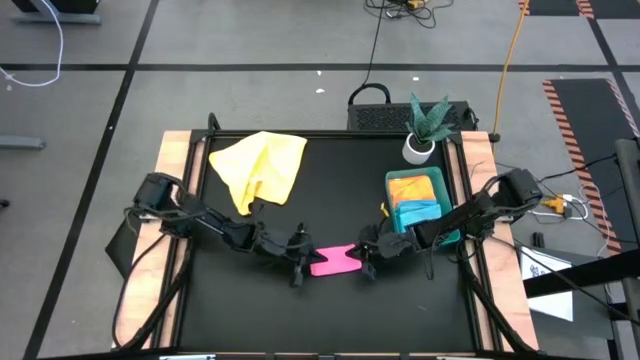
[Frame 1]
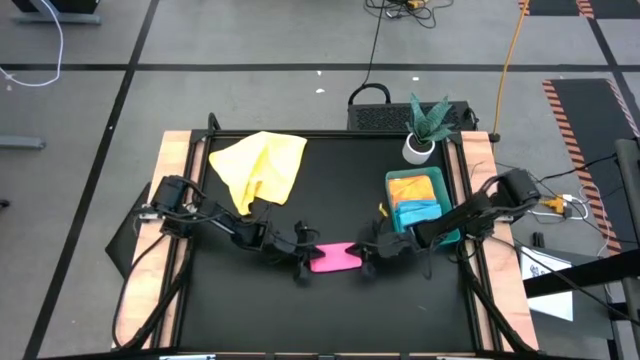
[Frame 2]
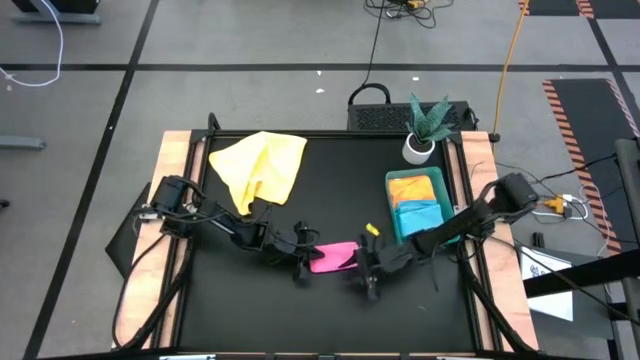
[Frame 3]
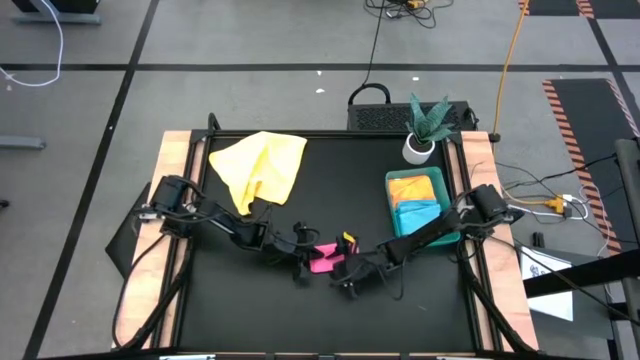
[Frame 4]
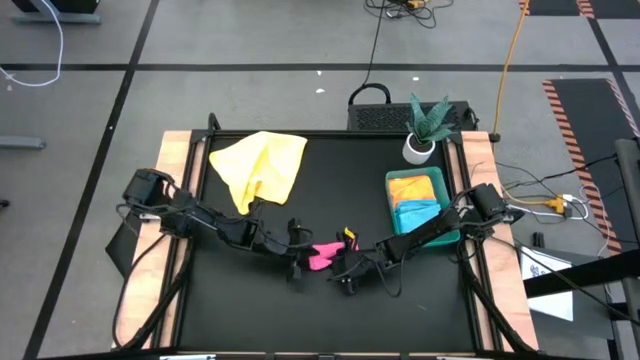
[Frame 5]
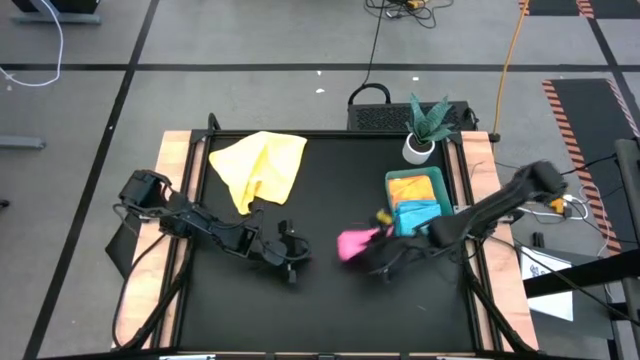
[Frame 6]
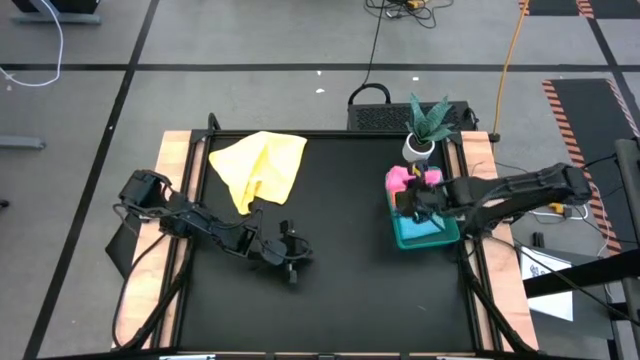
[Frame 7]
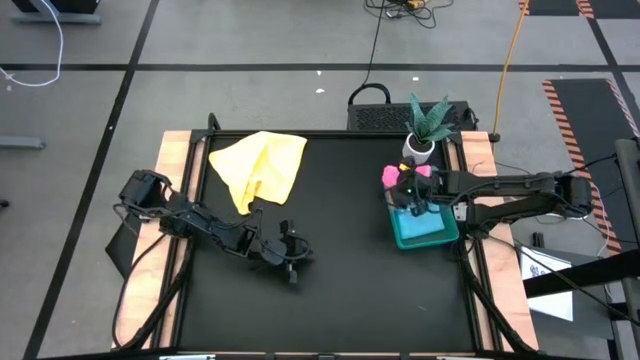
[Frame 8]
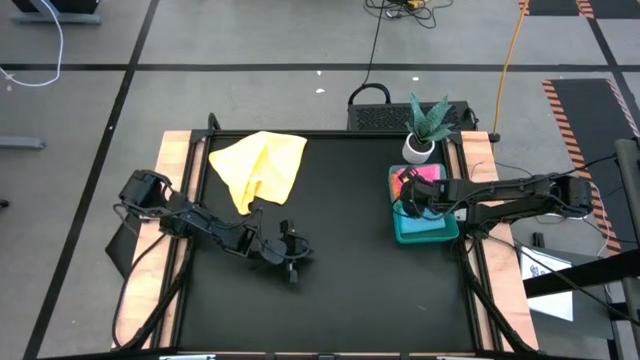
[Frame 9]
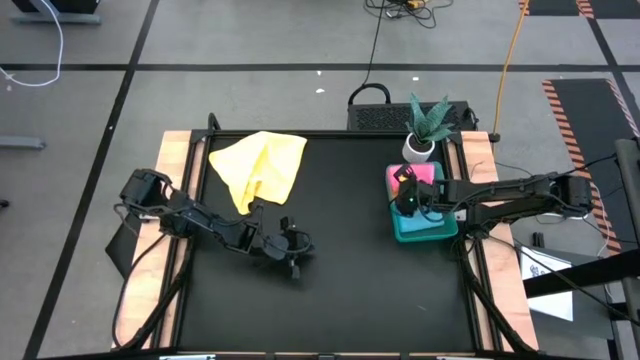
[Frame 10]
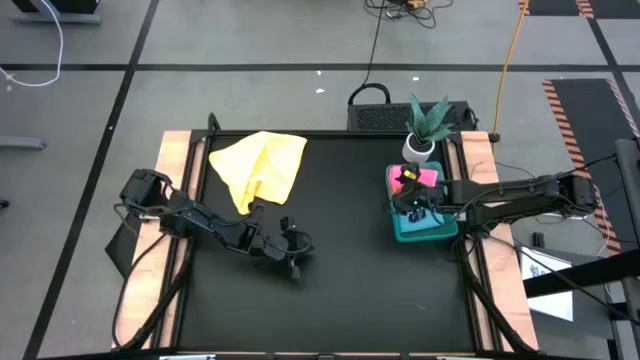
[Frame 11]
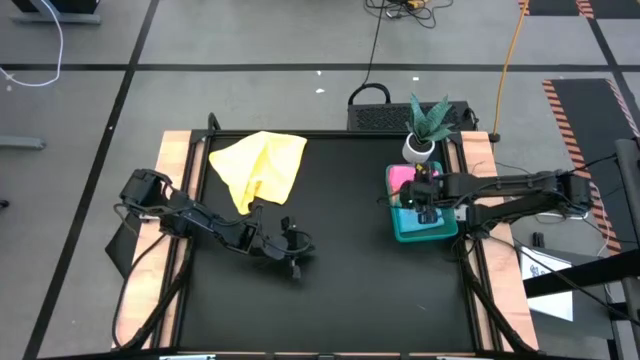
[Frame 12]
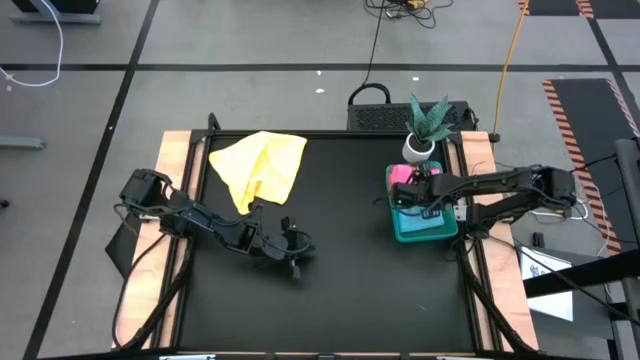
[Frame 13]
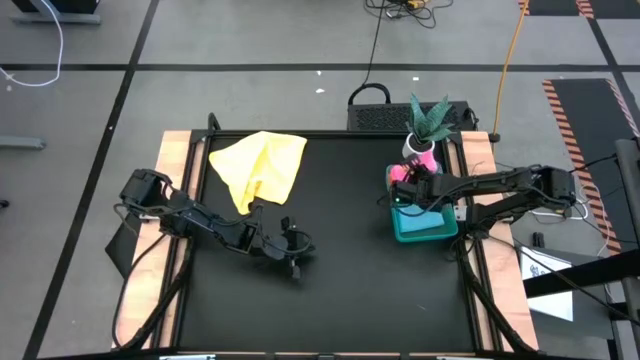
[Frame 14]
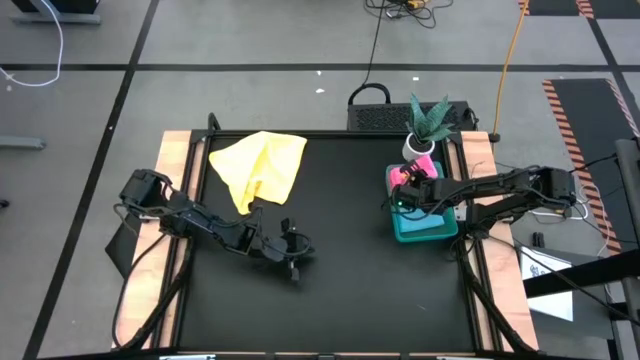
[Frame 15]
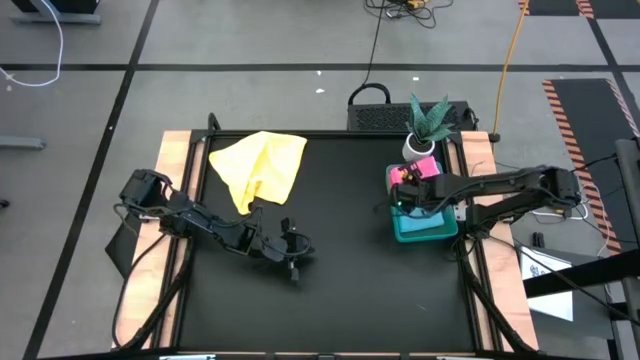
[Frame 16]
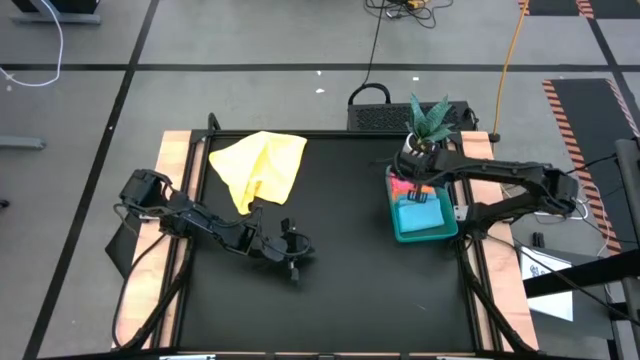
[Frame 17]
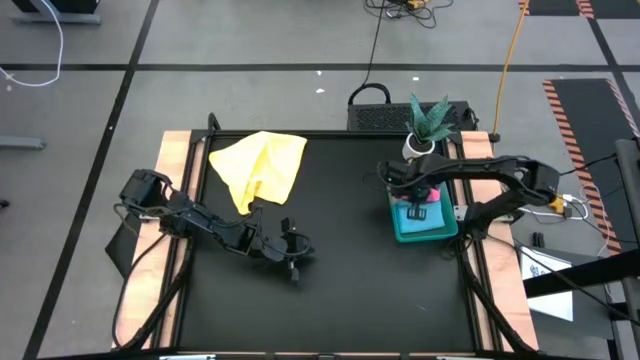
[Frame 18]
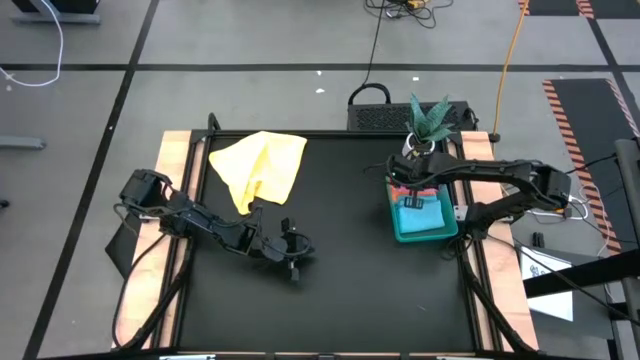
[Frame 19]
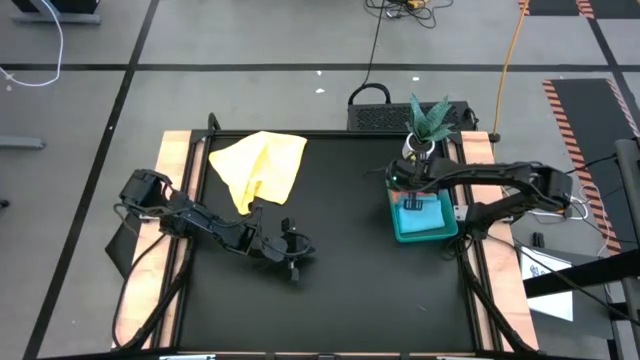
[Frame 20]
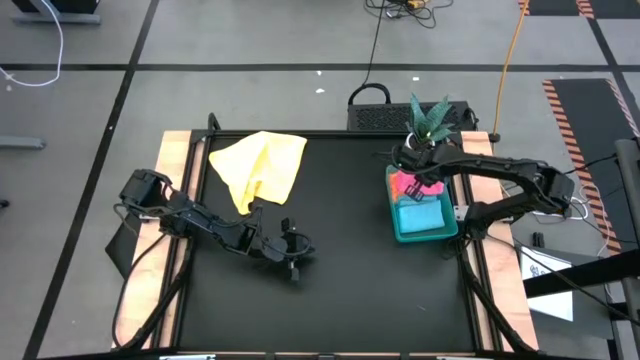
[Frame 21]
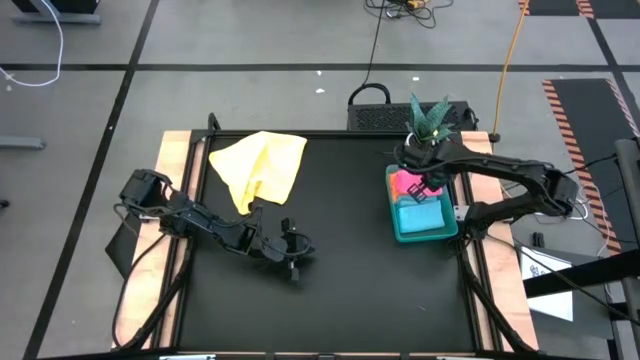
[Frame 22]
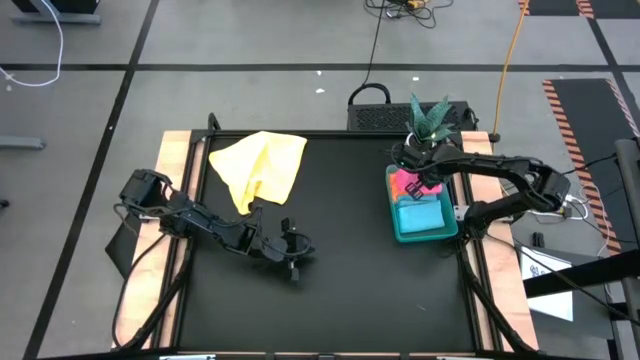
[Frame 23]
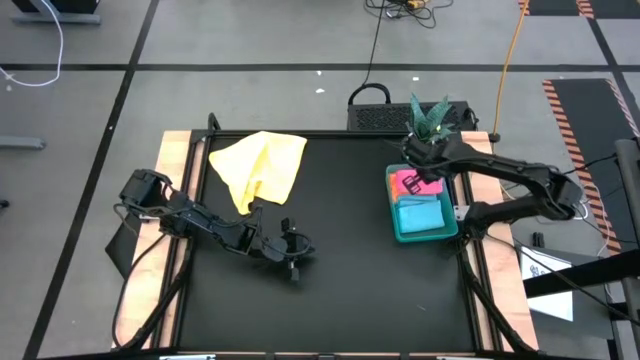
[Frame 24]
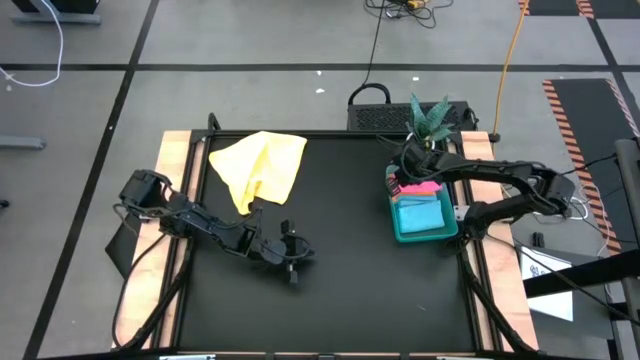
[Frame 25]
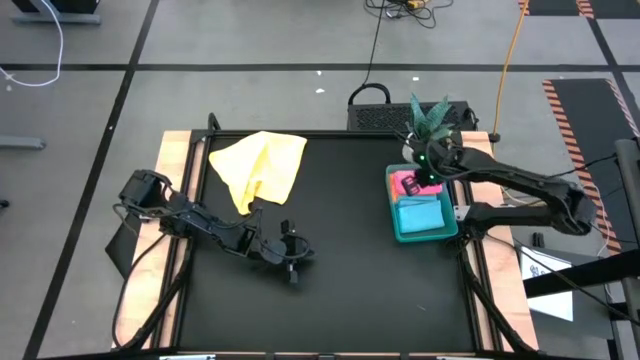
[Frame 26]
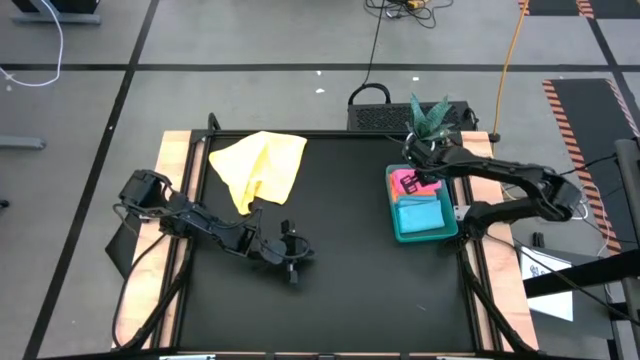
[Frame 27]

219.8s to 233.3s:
Task: Fold microfiber towels
Put the pink microfiber cloth into the green bin

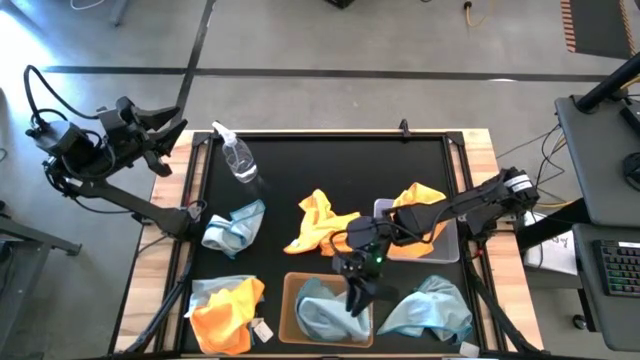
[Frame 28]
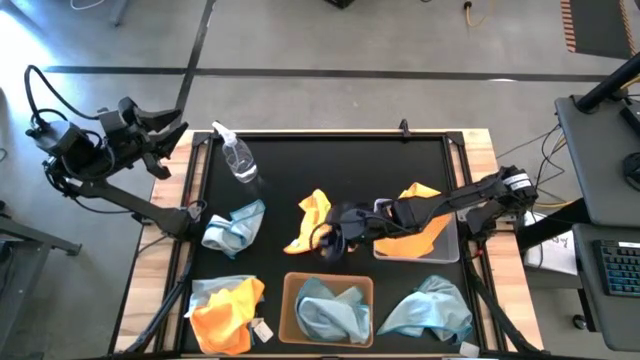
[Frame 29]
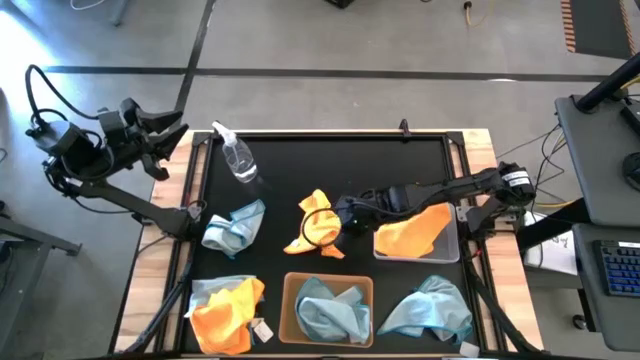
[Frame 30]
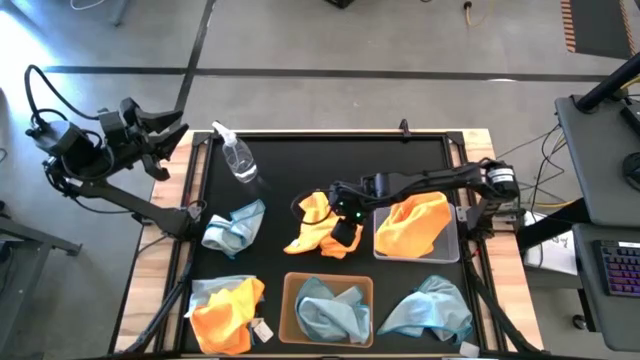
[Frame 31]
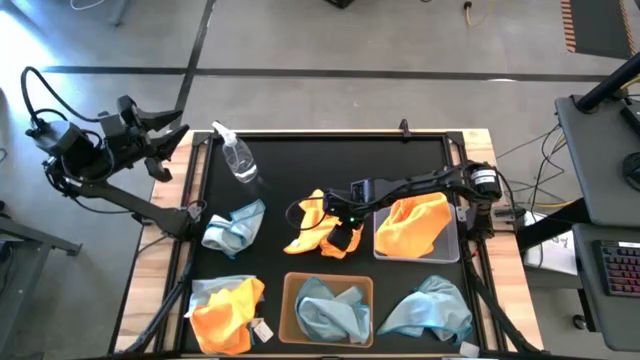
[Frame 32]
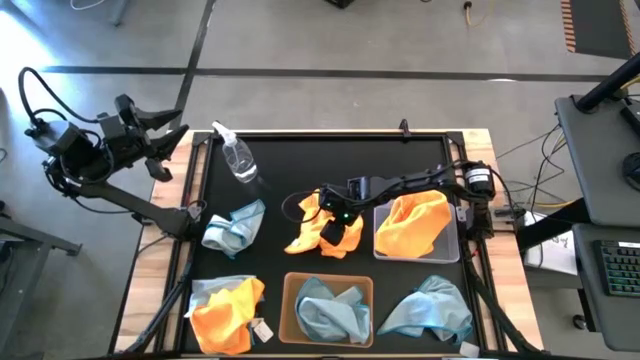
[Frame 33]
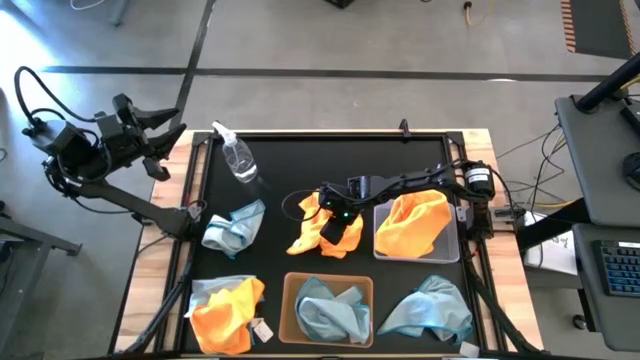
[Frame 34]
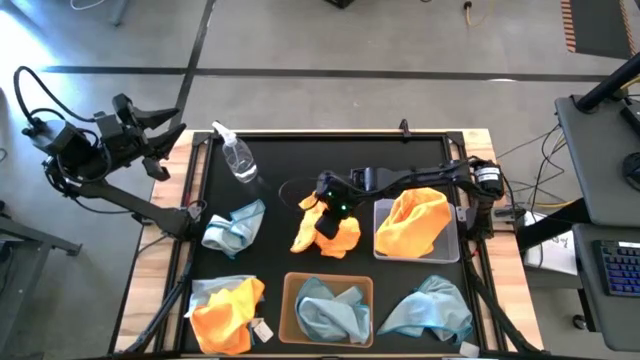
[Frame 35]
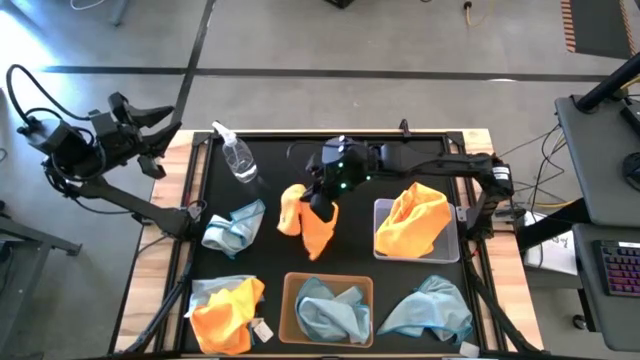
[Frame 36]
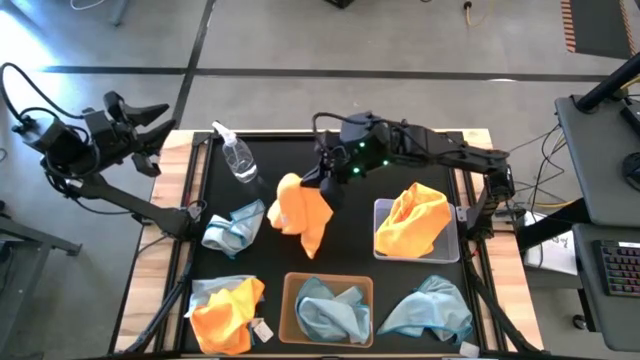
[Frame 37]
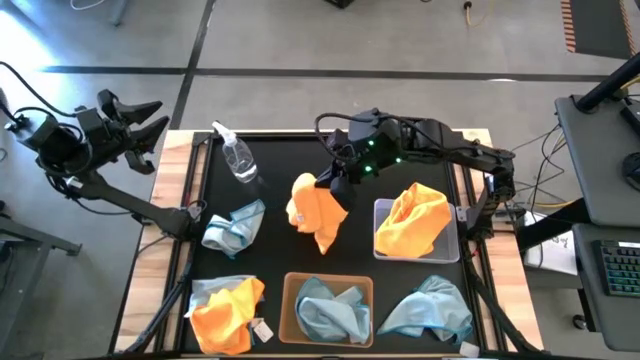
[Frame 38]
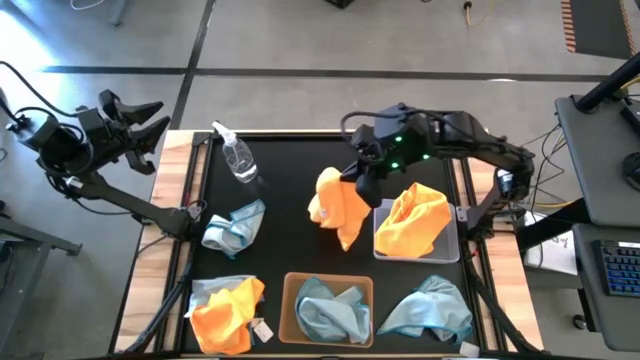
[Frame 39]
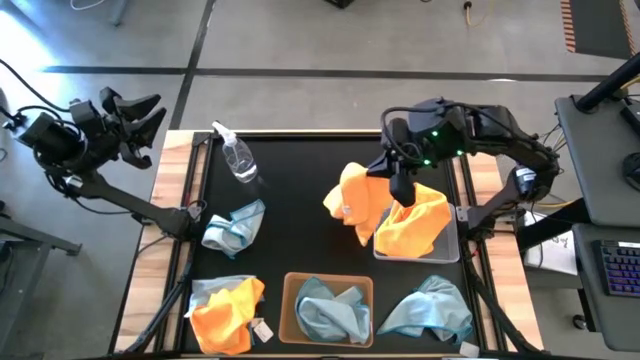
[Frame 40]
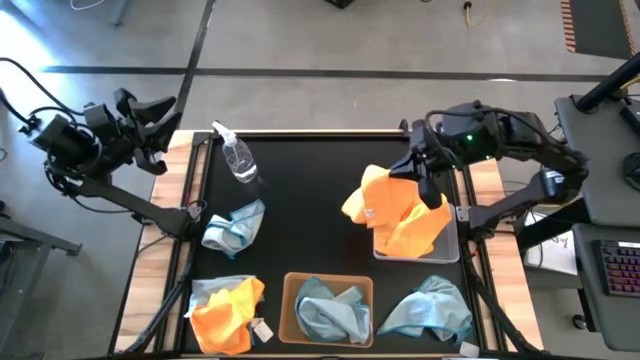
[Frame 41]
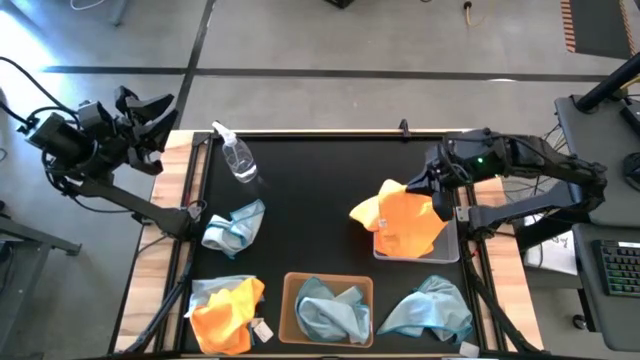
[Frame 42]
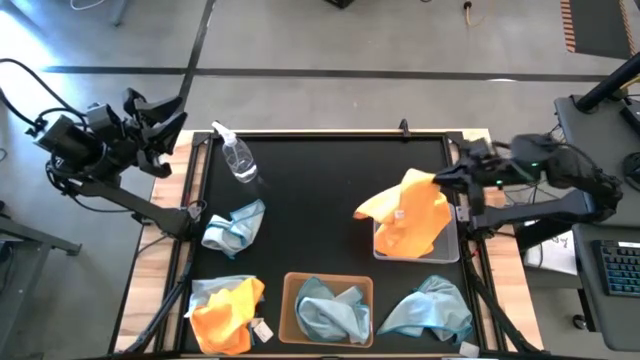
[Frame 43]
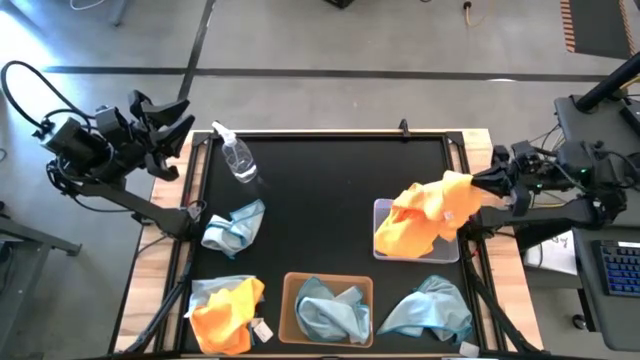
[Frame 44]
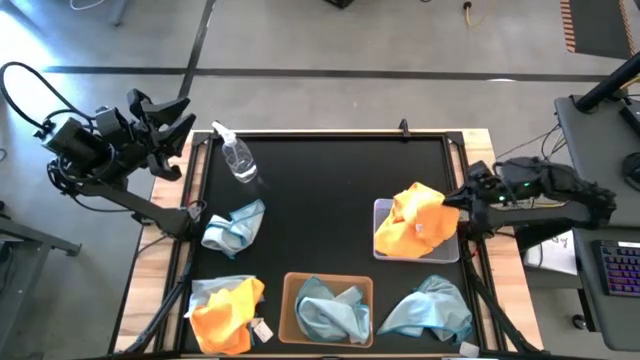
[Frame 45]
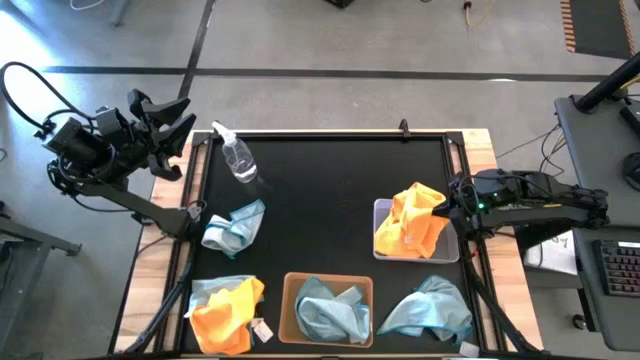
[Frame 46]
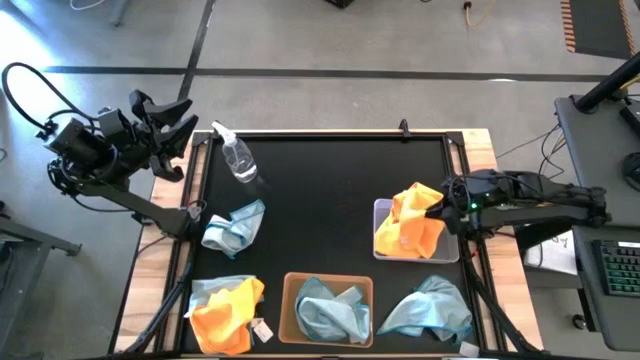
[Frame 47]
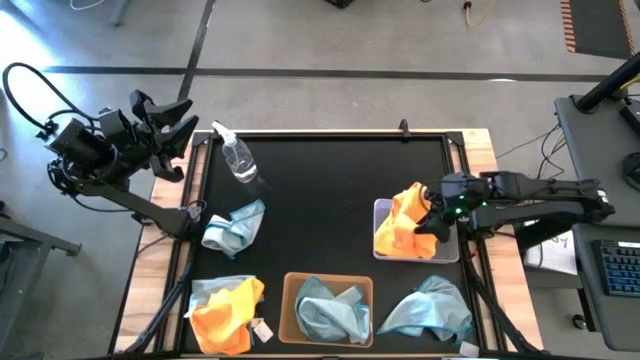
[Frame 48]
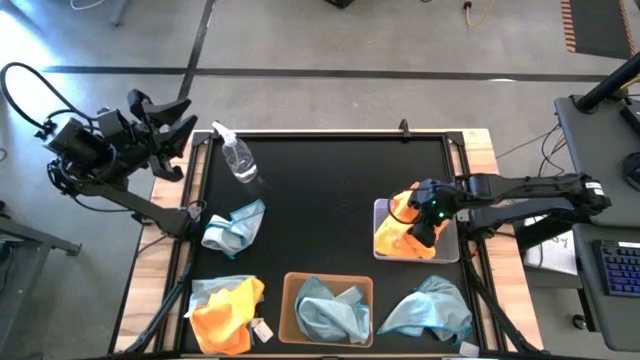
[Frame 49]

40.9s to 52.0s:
Task: Sort microfiber towel by color & place in baskets
Put the top orange microfiber towel into the transparent bin
